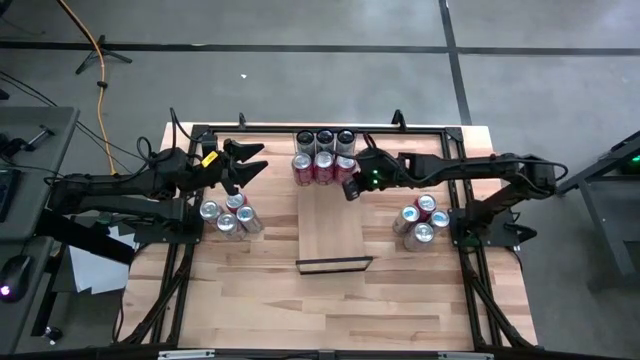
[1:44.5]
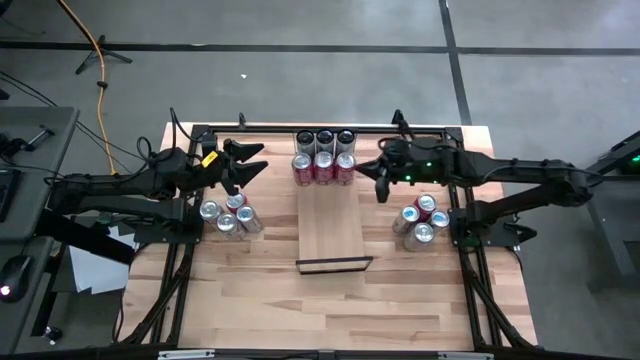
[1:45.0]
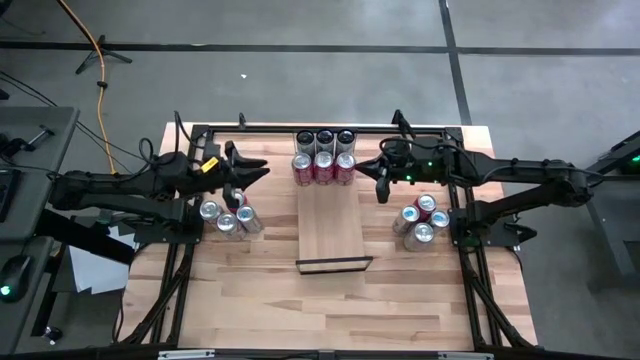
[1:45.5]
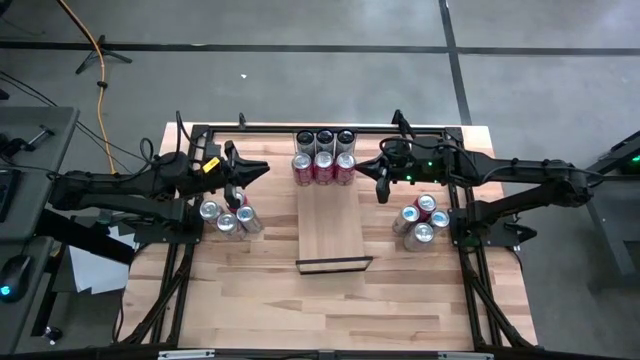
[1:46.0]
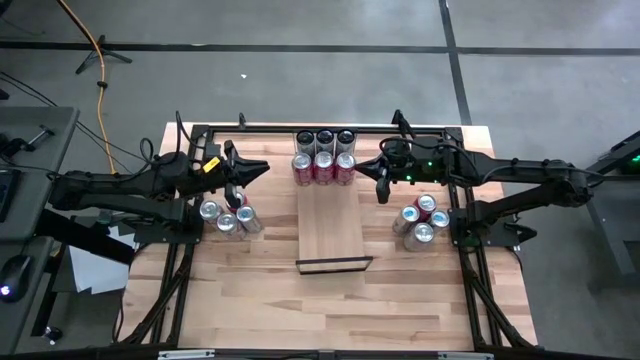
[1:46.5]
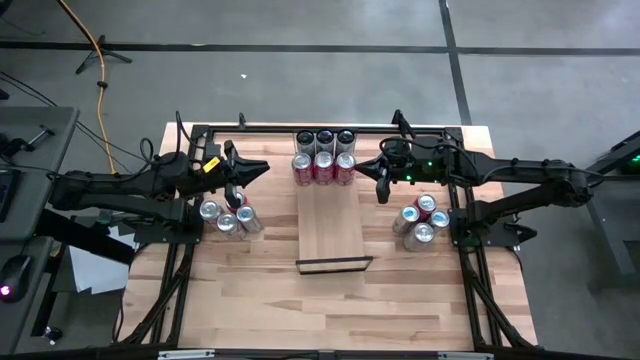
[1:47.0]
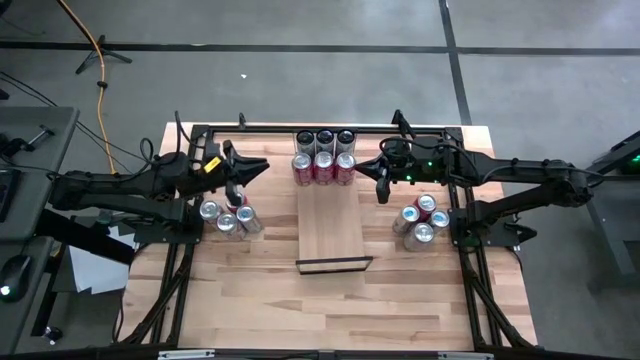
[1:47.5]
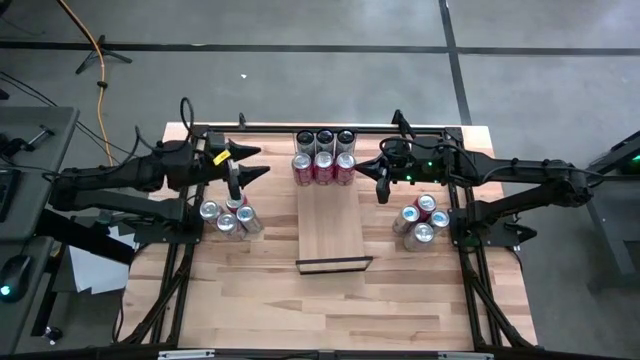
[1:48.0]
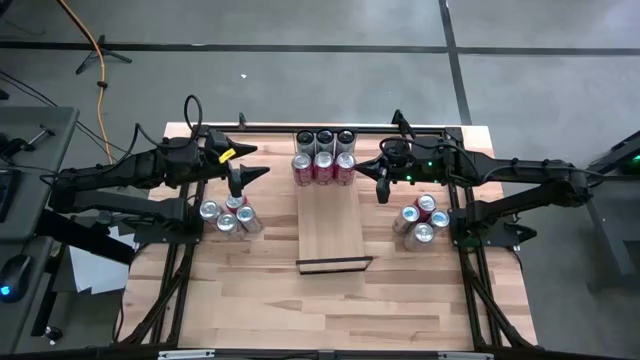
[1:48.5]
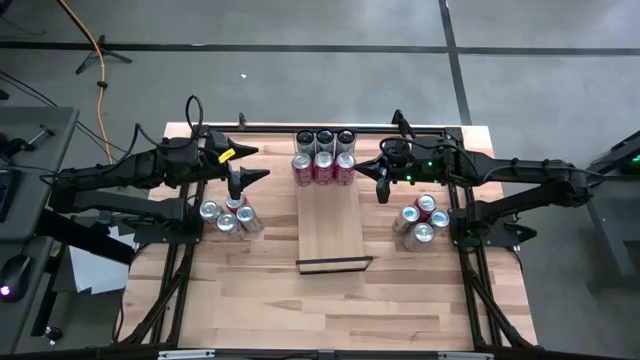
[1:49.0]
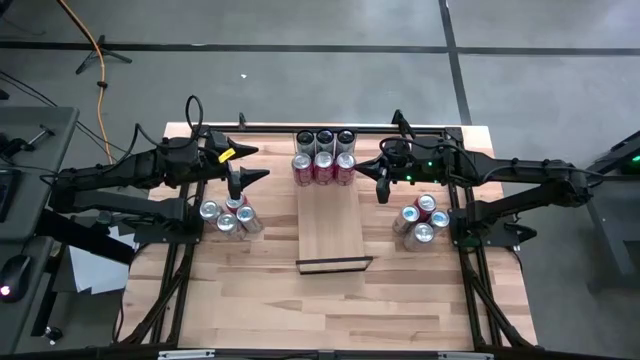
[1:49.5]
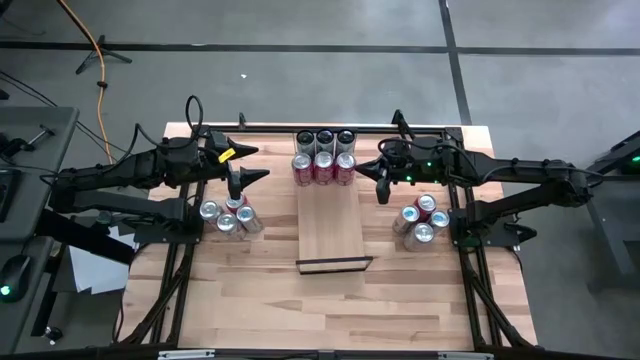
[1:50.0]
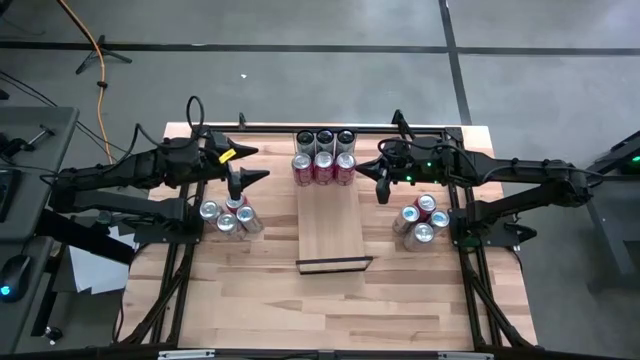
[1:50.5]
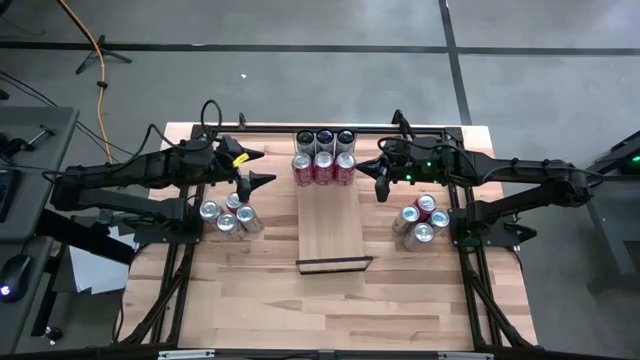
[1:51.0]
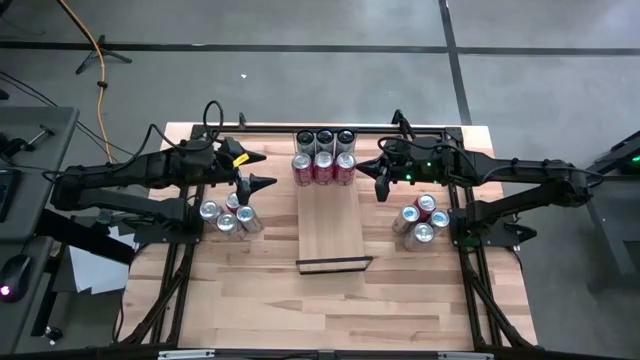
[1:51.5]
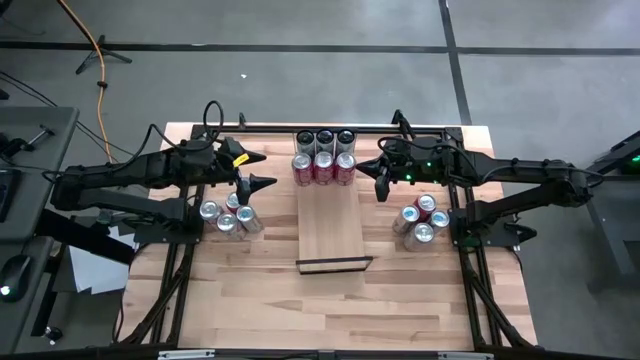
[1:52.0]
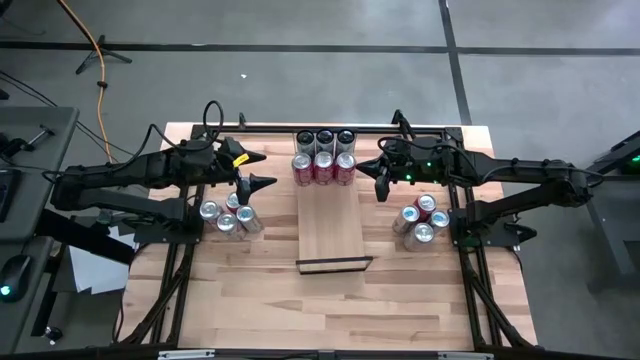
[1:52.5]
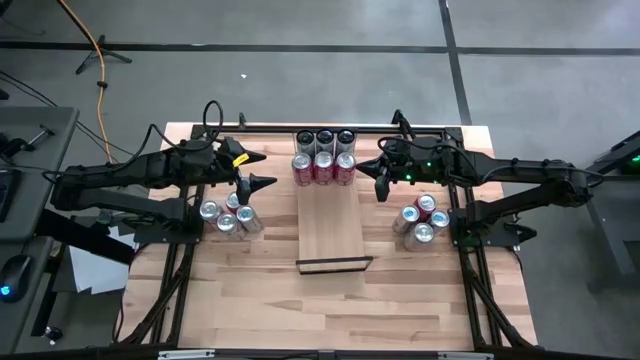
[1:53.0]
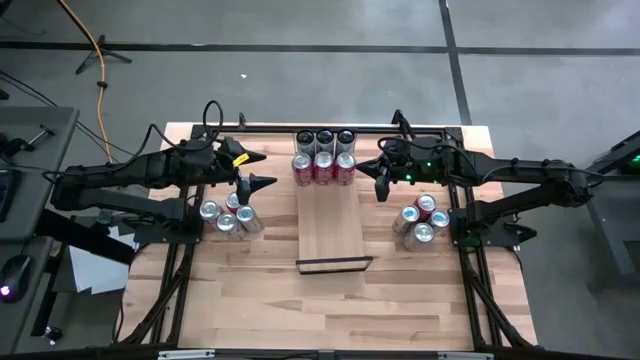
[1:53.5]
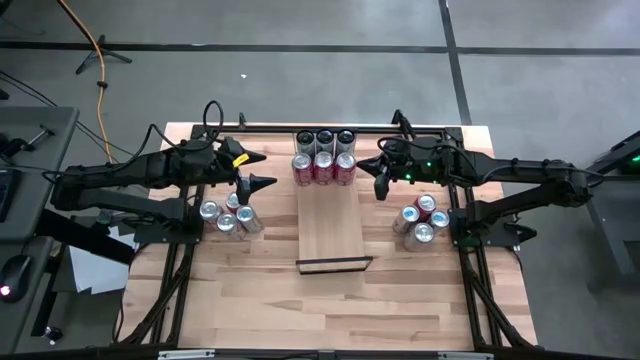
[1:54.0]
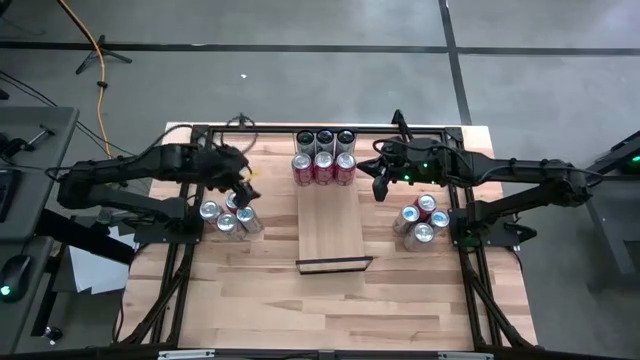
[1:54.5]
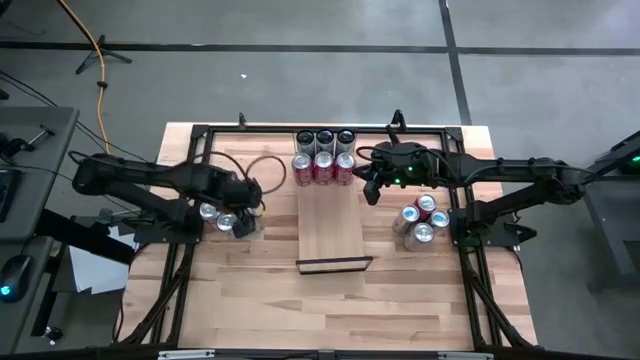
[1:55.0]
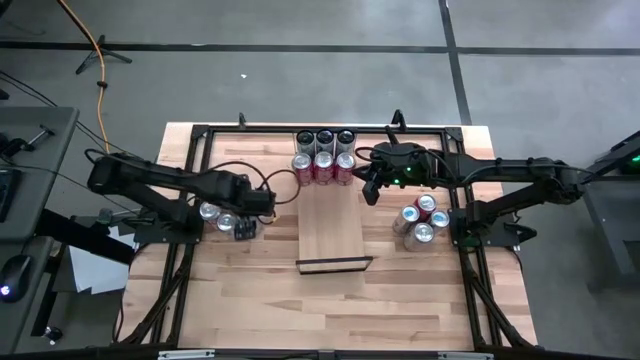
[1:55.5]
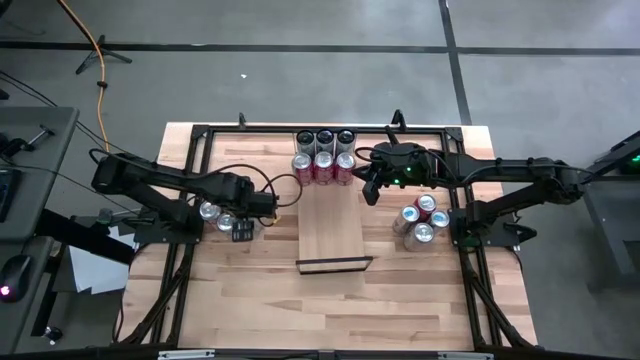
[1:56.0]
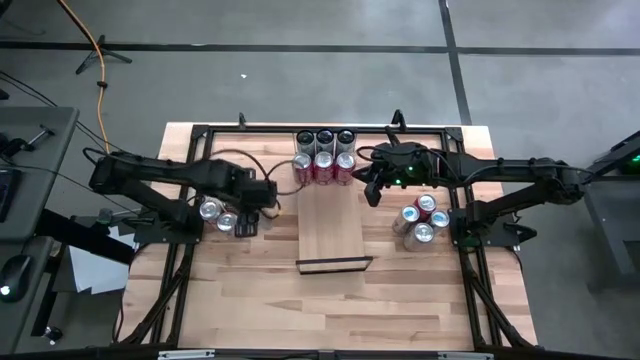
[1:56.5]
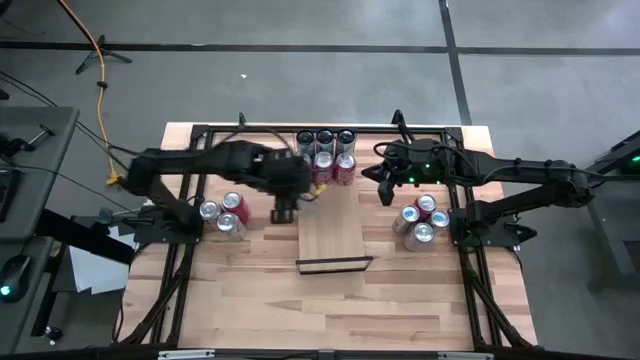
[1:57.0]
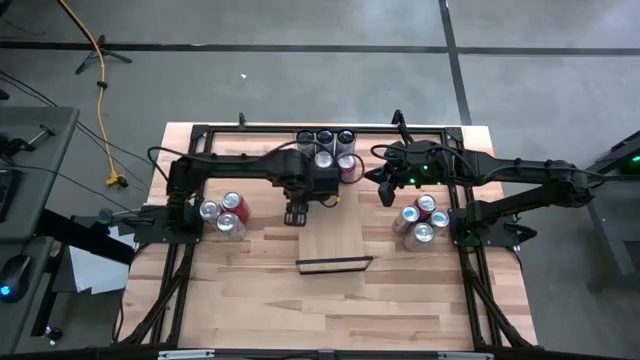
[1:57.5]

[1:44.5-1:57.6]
Task: Place canned beverage on shelf
Put the top left blue soda can on the shelf

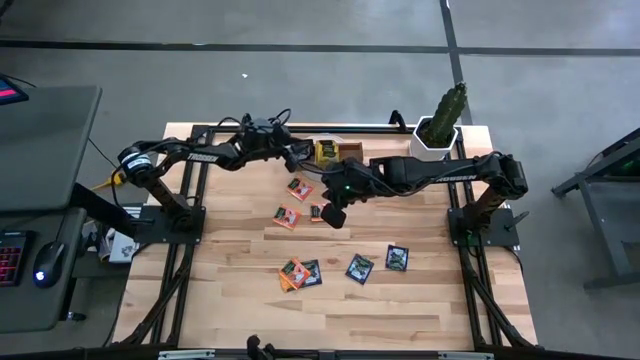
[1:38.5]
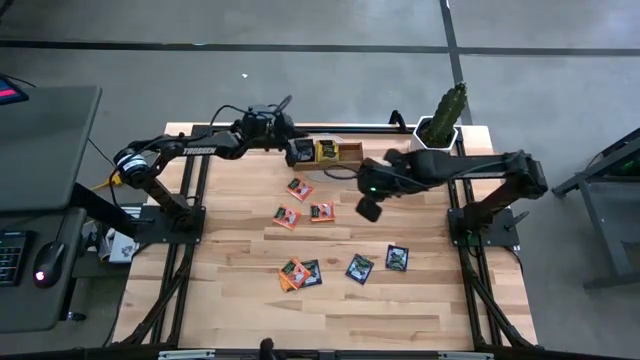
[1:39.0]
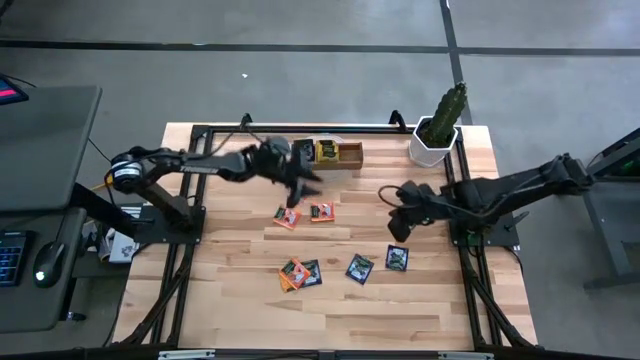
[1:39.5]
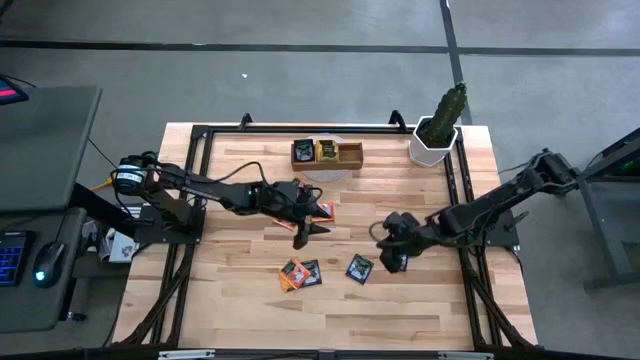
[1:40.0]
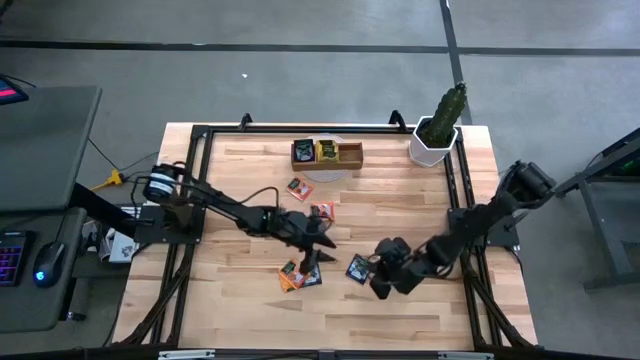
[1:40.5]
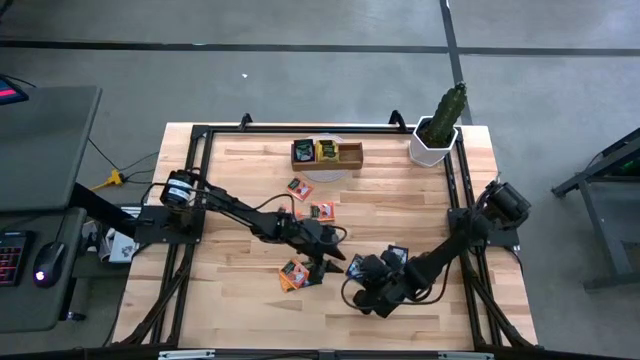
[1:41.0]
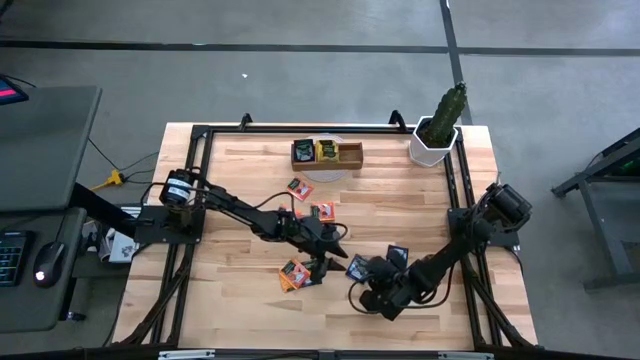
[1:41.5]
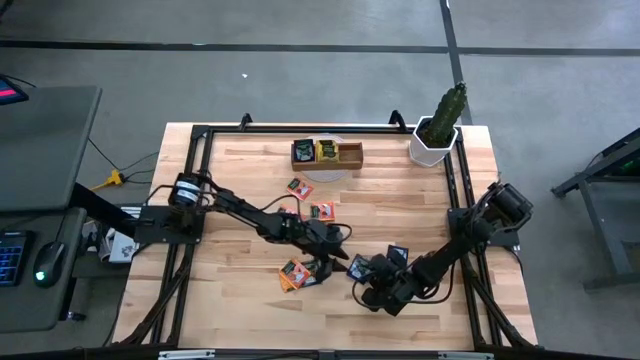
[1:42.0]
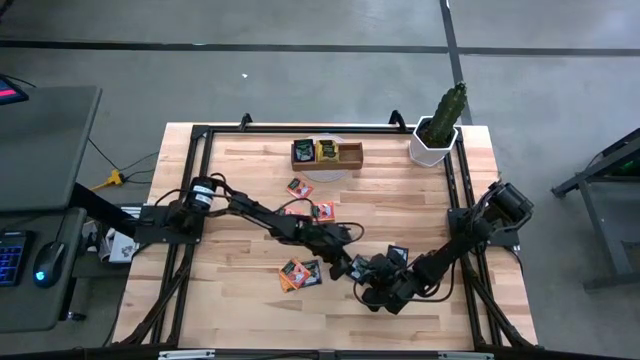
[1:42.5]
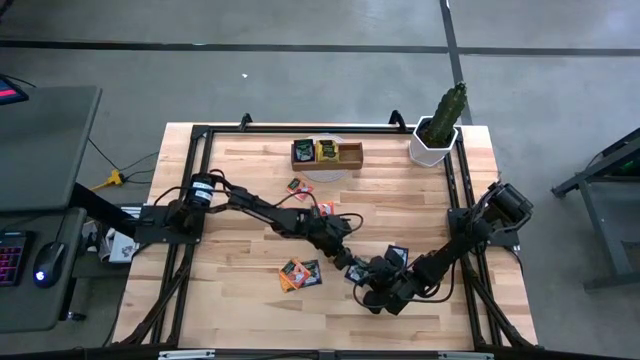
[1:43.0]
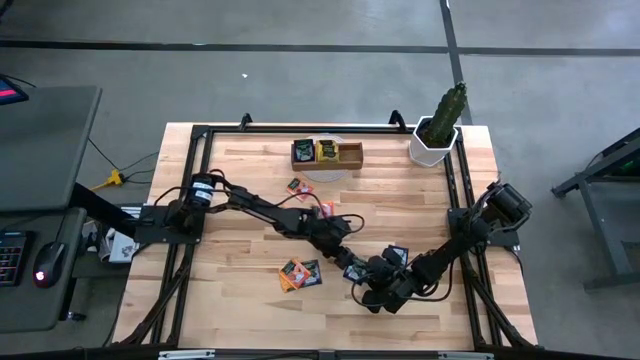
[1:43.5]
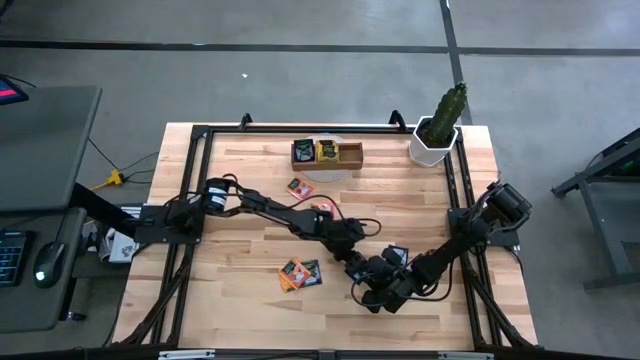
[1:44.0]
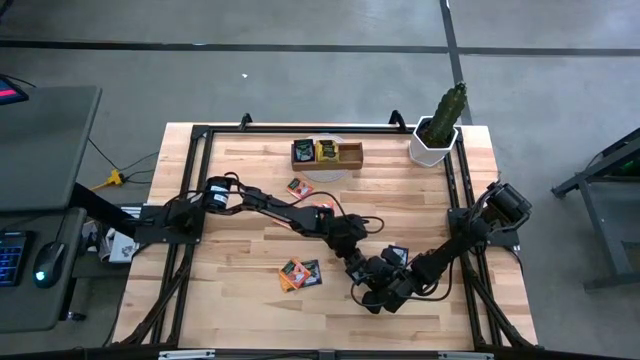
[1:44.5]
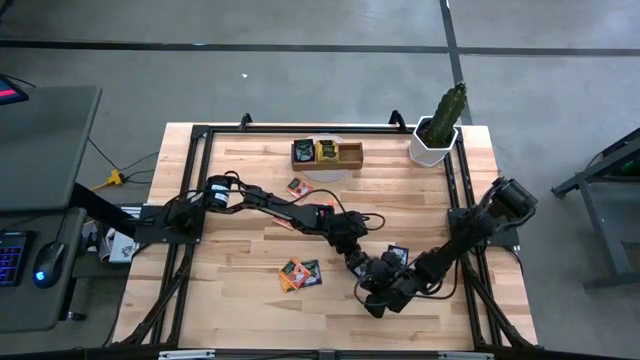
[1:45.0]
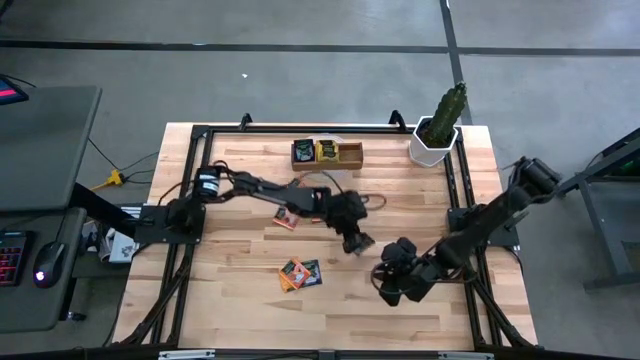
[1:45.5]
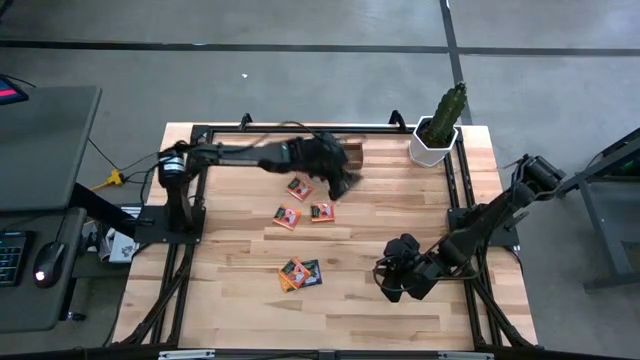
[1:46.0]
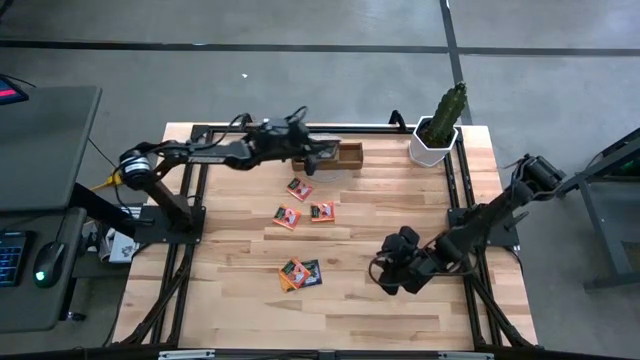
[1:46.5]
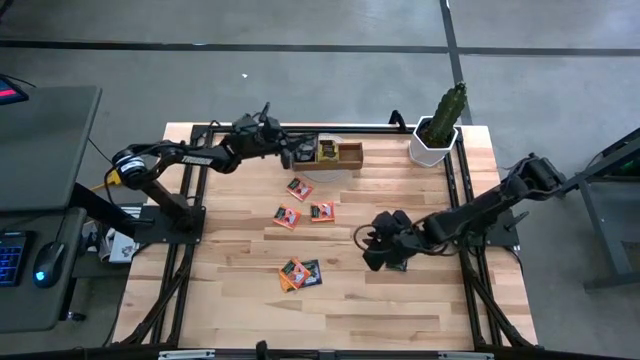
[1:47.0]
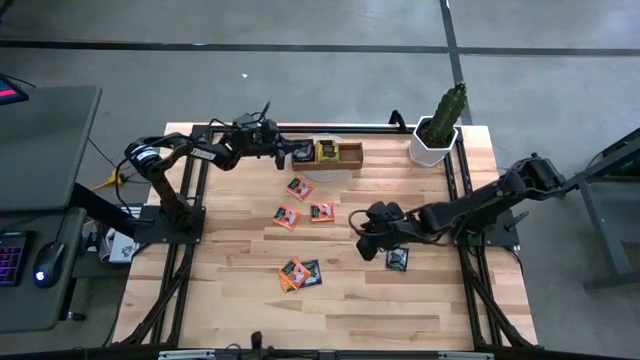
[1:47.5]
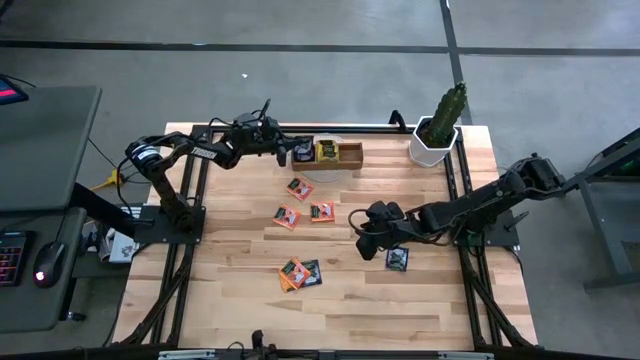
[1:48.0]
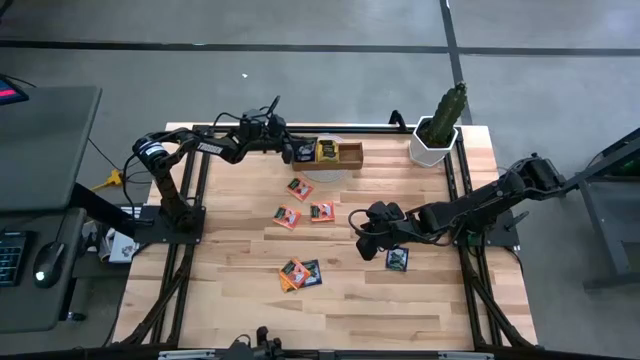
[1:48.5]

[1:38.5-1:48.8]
Task: Pick & Place Tea
Put the middle purple tea bag in the left compartment of the organizer
